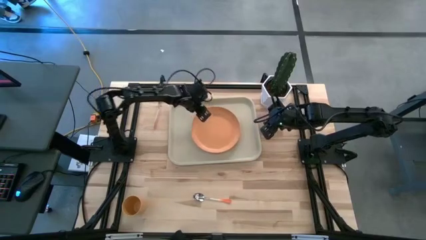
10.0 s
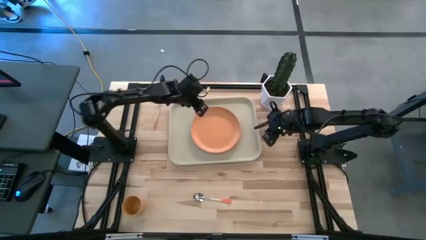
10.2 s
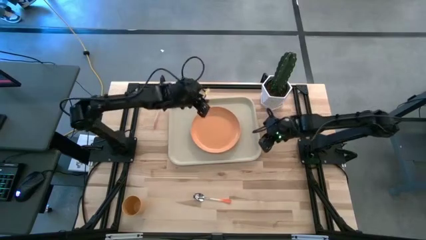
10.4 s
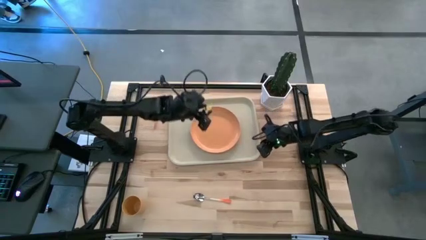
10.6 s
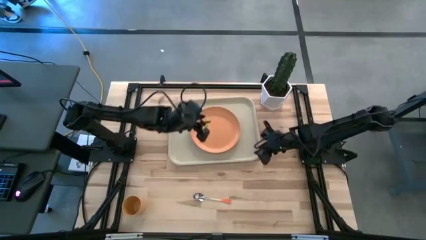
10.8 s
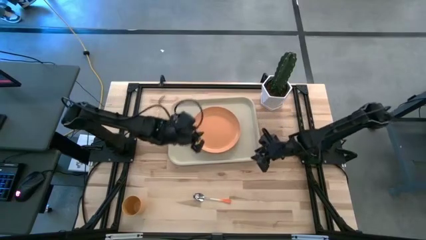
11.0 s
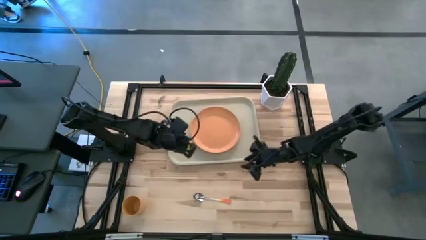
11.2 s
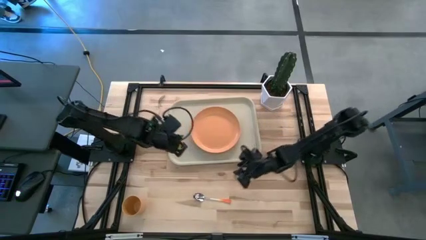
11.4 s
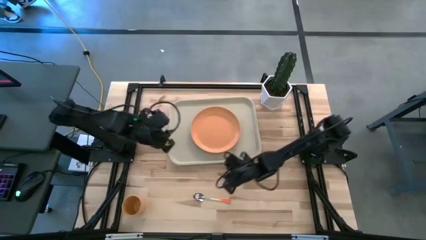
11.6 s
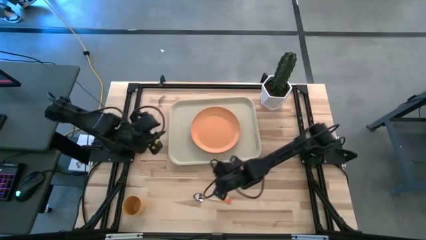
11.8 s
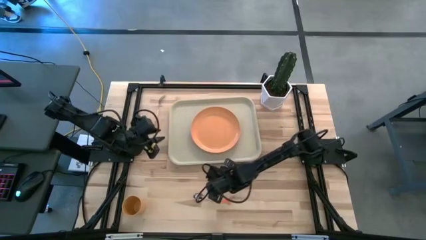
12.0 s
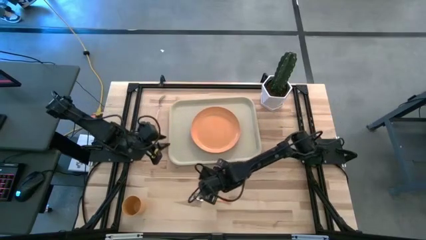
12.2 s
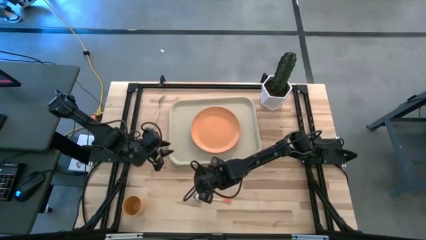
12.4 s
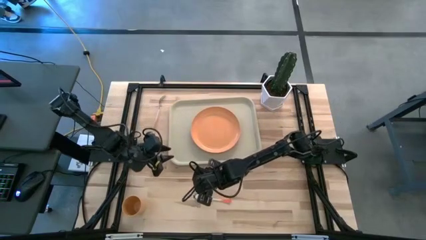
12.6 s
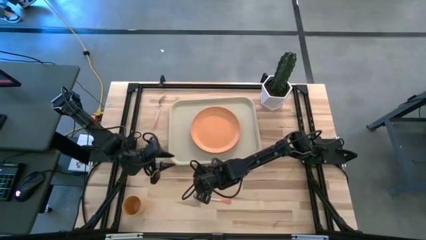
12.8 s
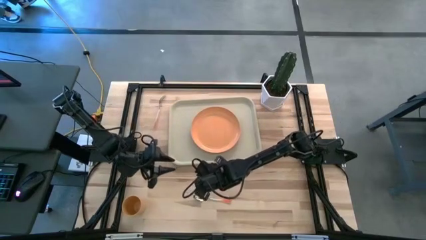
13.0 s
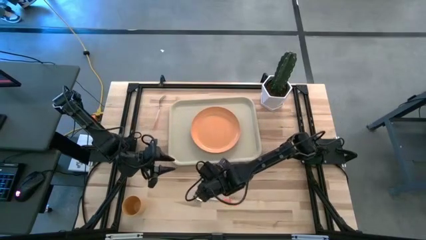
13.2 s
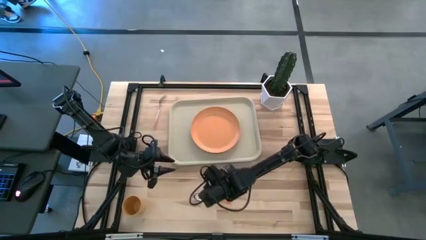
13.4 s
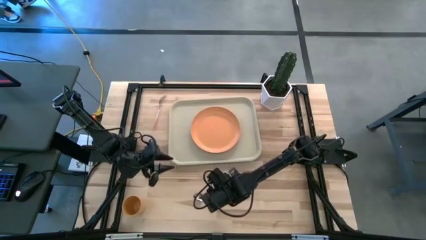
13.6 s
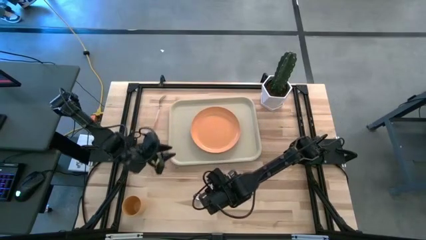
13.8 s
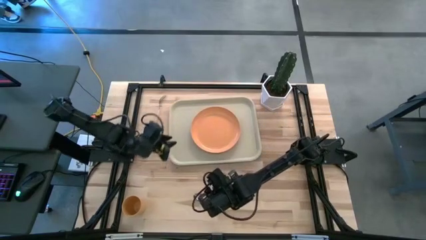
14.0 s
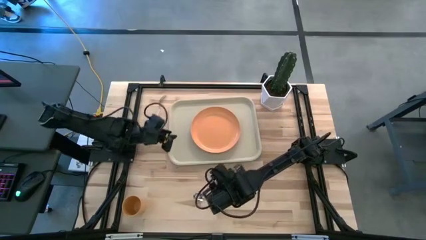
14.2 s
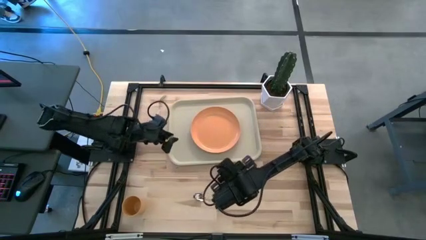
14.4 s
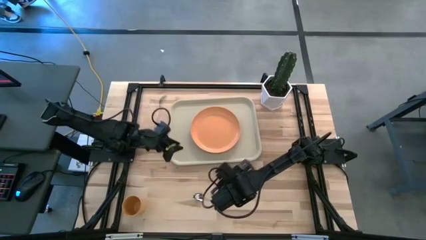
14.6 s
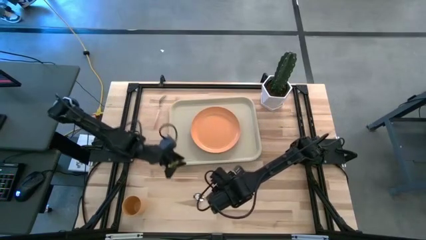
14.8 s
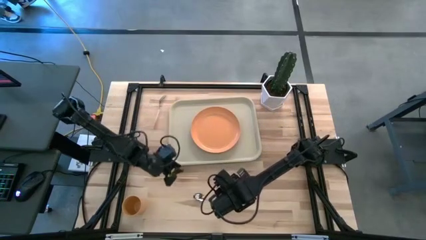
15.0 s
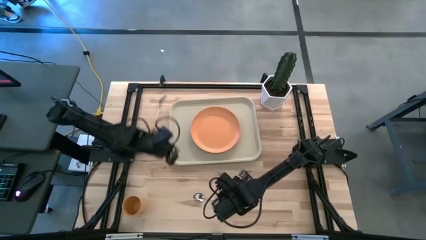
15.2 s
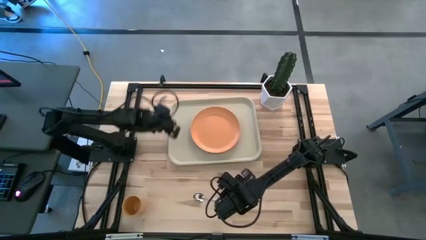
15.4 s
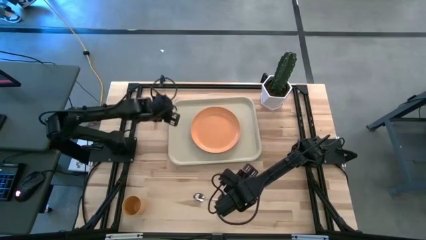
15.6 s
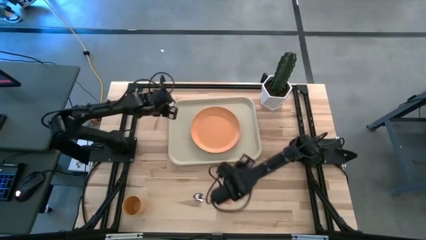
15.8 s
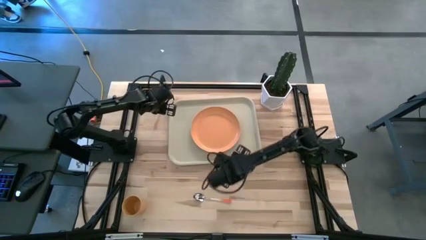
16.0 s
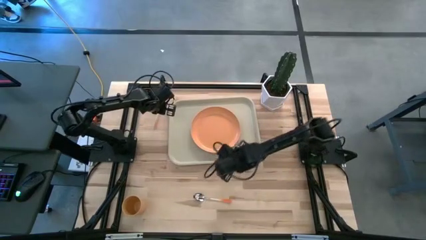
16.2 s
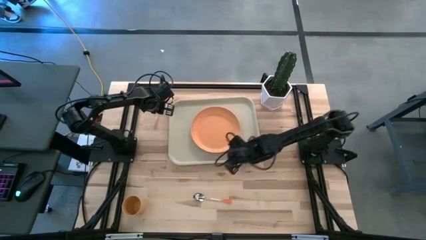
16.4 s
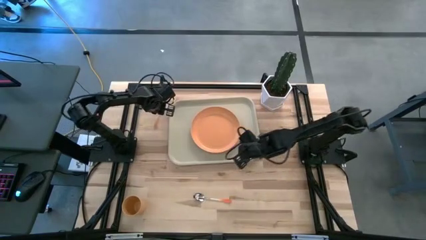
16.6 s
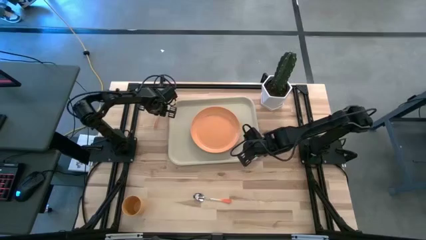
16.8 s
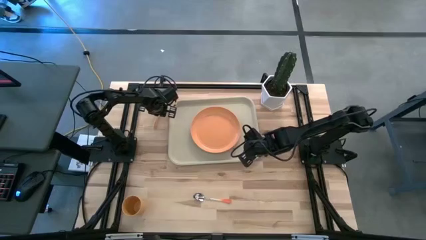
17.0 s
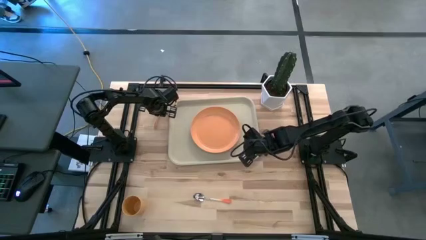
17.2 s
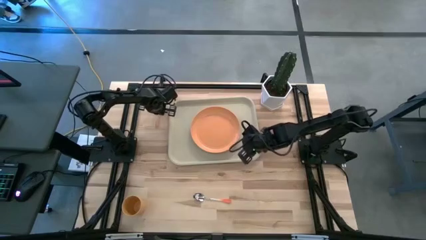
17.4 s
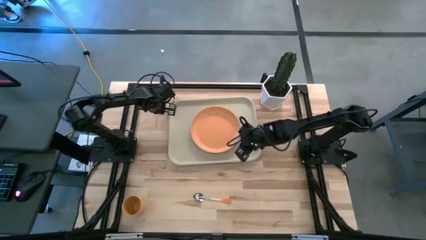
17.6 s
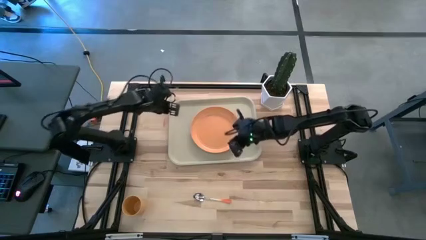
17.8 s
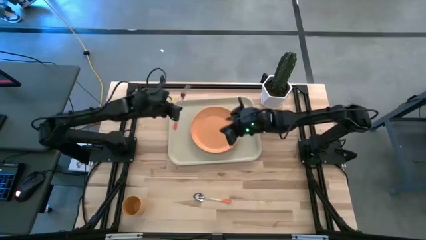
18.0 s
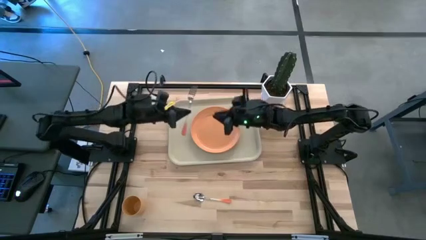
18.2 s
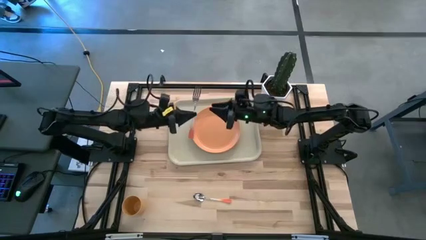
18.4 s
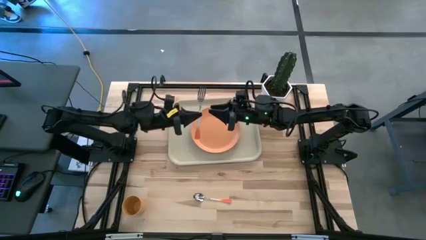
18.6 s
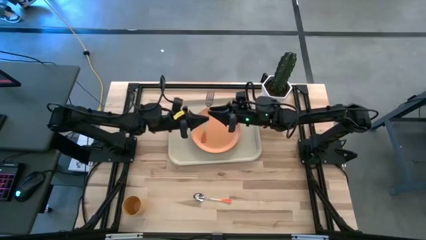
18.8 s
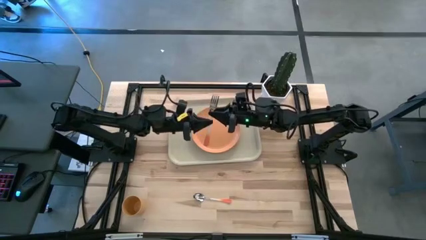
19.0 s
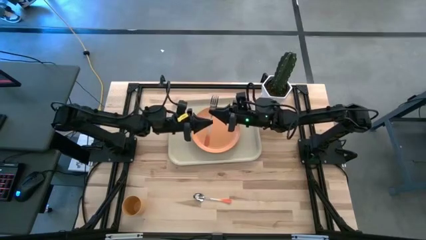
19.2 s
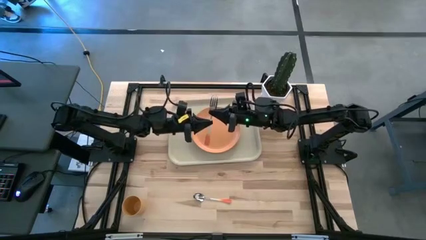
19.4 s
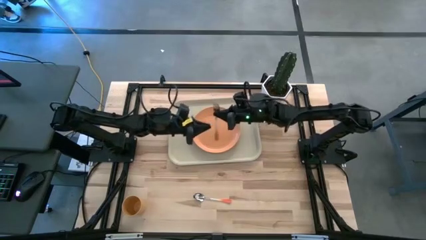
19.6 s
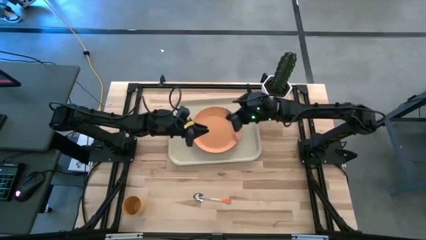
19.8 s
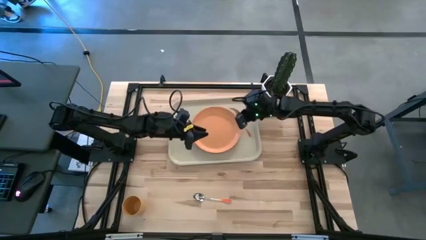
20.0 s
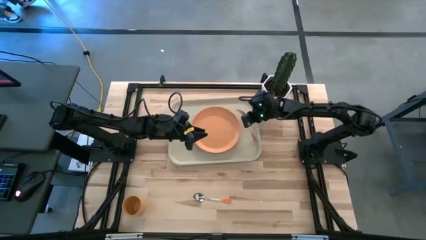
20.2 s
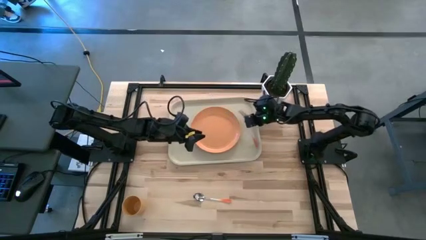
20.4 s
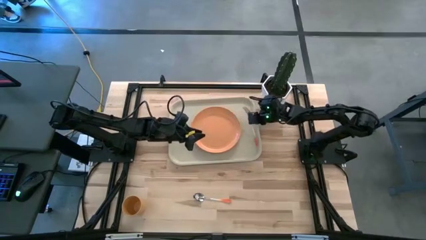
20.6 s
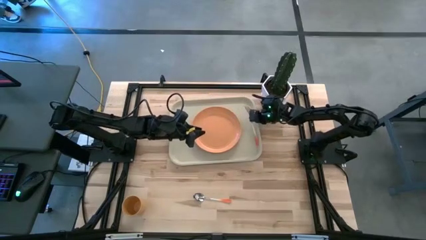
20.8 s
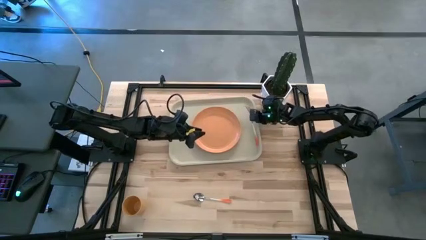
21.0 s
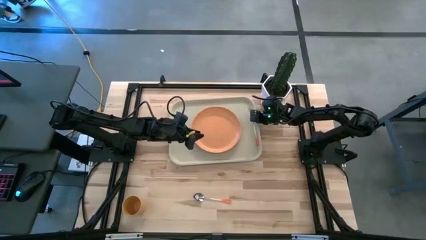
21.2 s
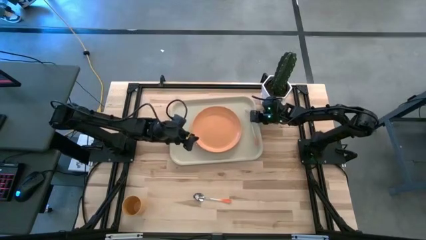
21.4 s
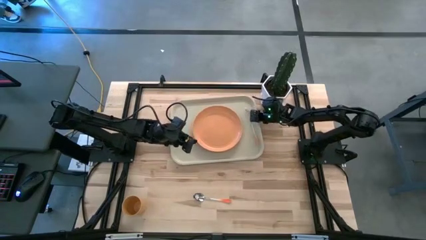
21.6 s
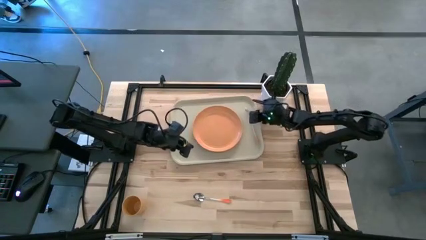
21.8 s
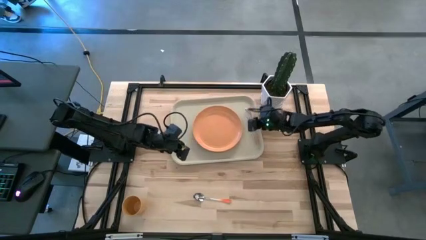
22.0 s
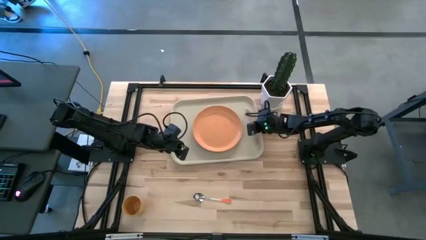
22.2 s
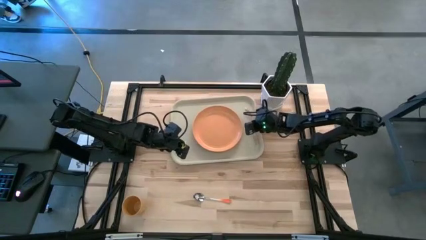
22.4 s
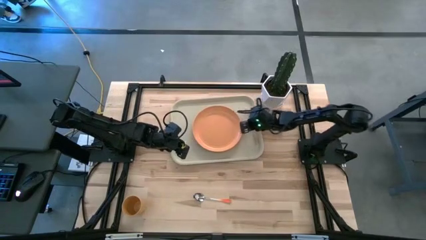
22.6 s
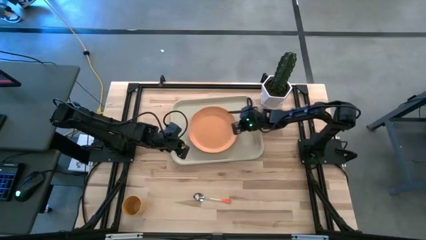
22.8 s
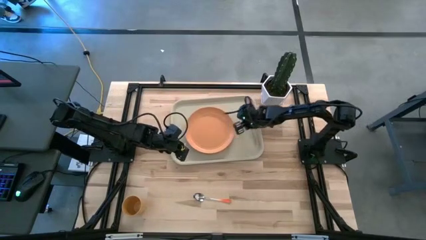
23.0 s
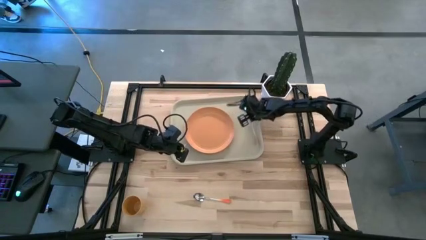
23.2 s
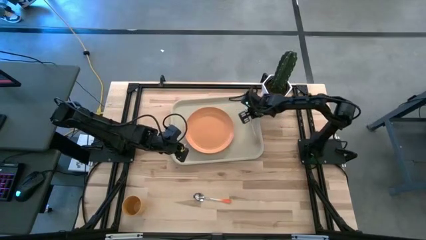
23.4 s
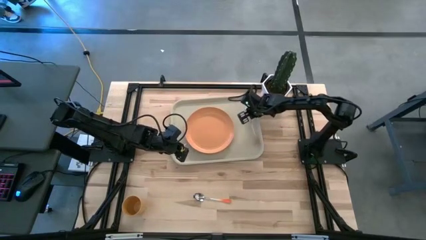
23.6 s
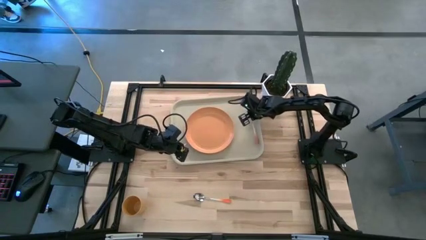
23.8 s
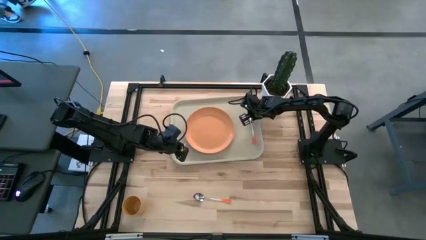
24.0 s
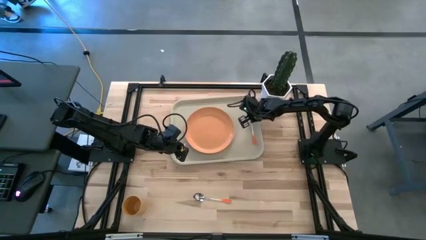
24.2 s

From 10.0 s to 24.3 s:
Task: Pick and place plate/cup/fork/spoon on tray
Put the orange fork on the gray tray to the right of the orange plate
